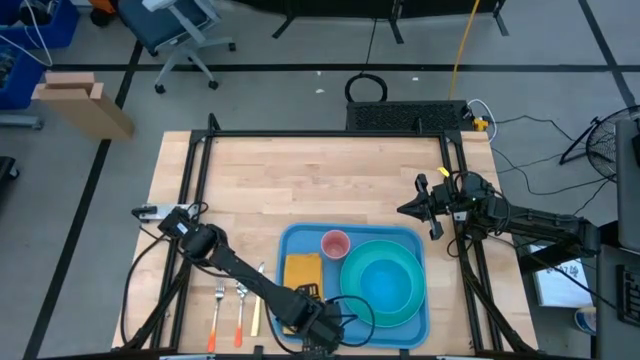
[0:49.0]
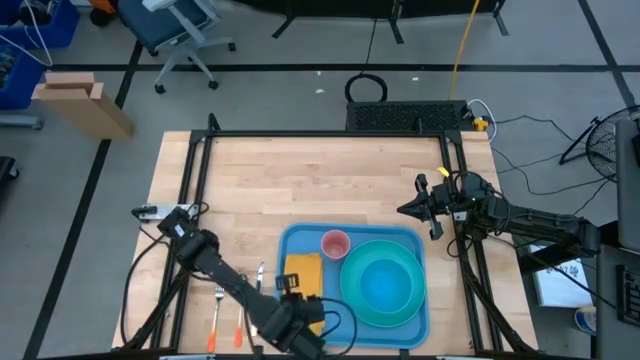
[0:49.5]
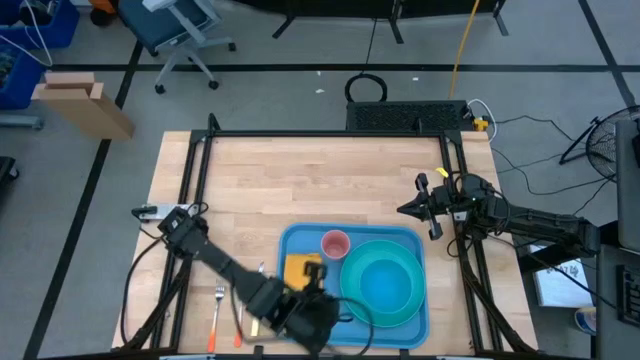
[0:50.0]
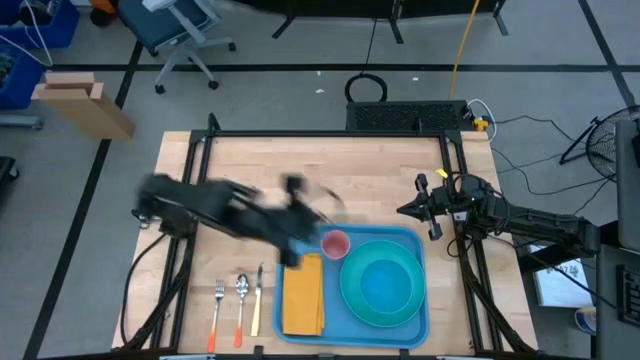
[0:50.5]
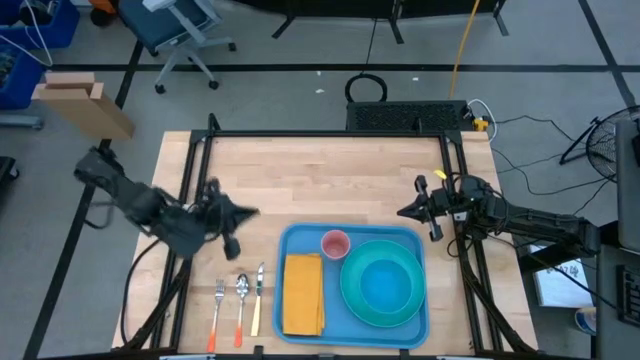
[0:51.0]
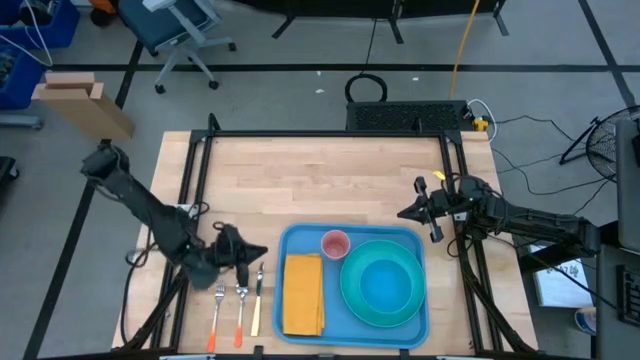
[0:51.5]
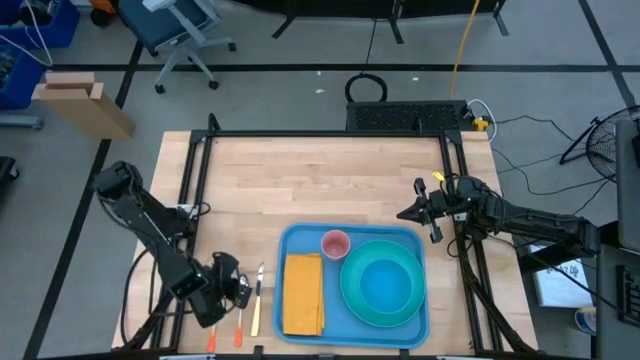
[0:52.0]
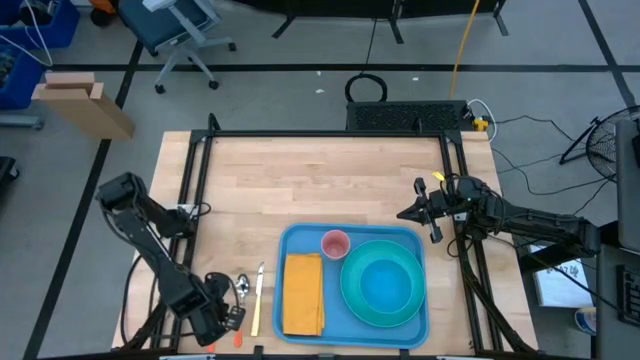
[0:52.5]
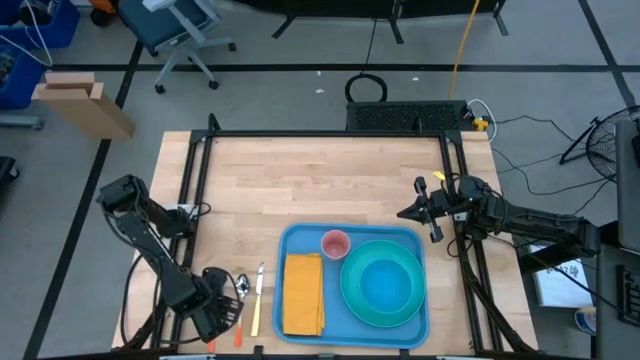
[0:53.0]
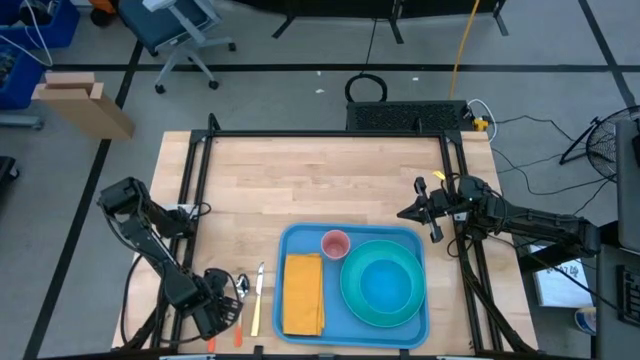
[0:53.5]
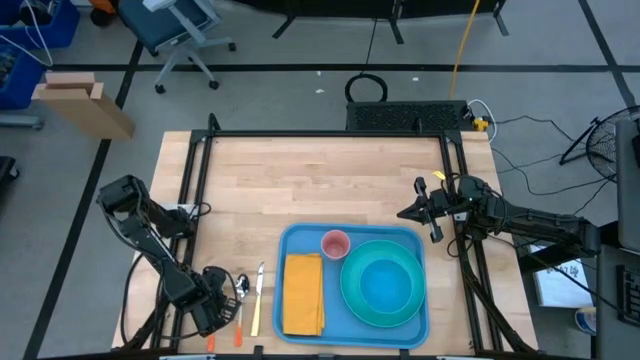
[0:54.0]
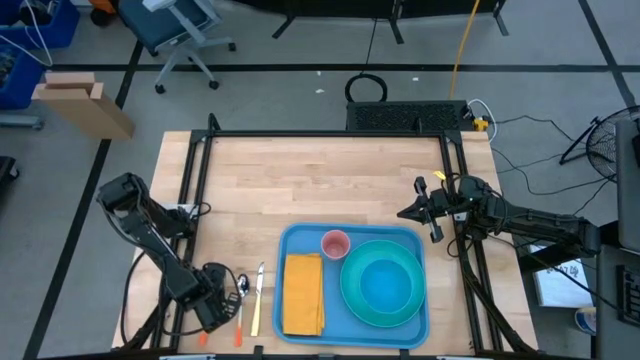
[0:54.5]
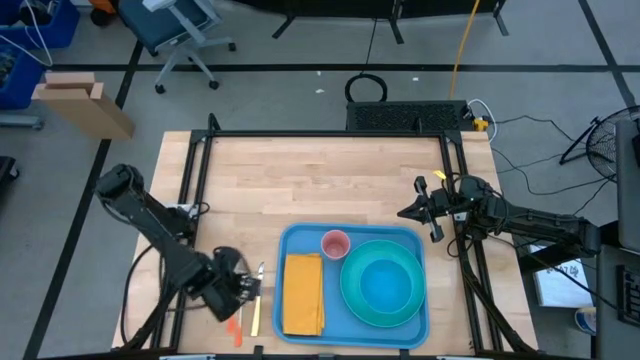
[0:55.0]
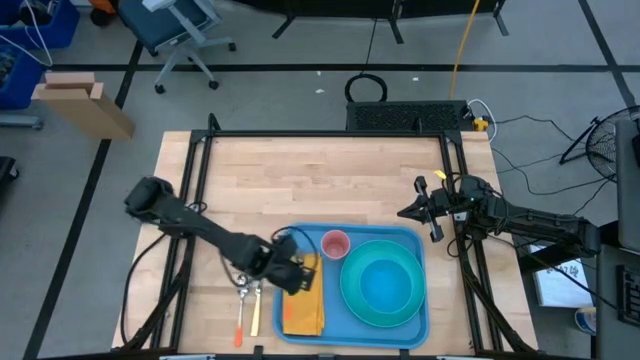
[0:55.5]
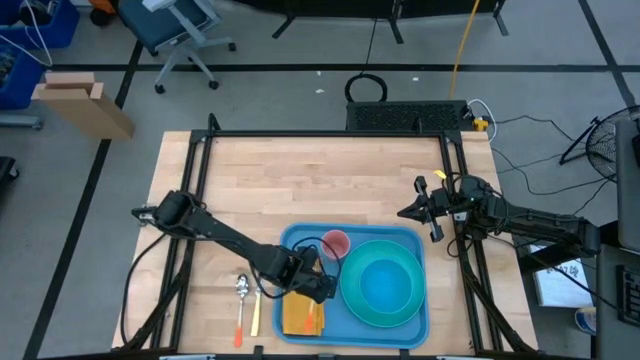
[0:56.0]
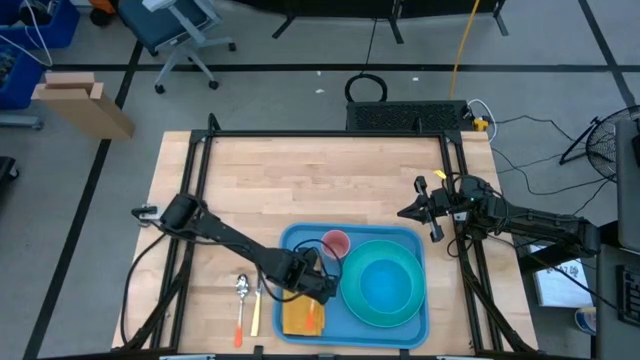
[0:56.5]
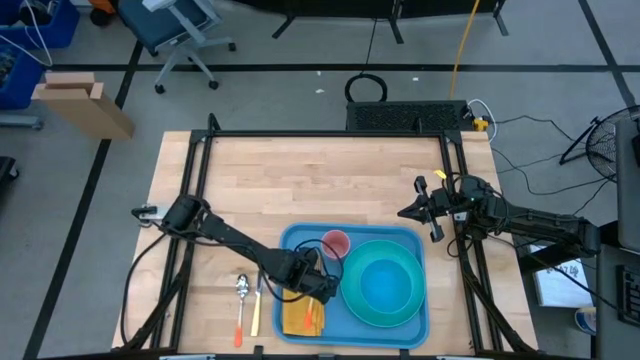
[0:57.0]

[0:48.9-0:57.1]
Task: Set up tray
Put the orange fork on top of the yellow napkin

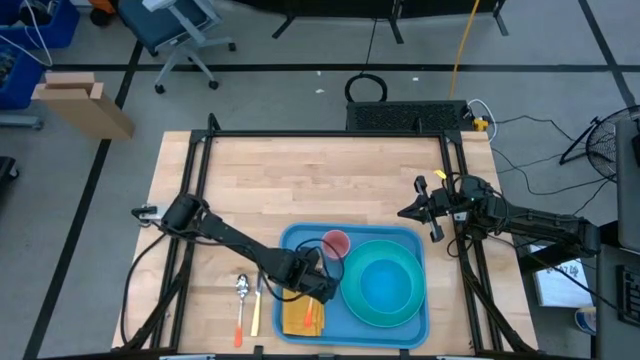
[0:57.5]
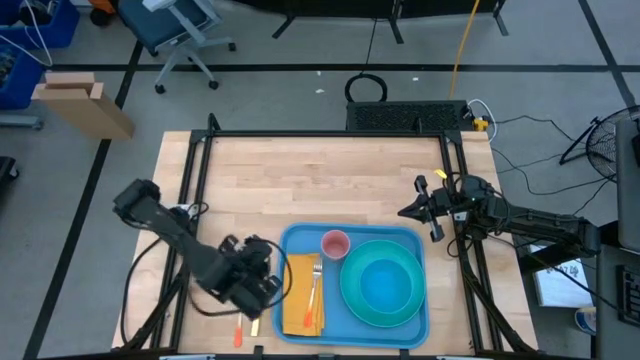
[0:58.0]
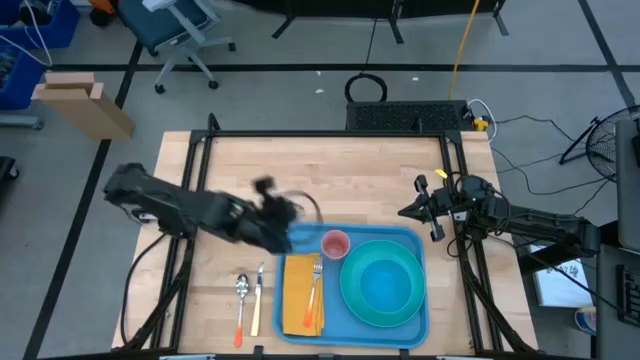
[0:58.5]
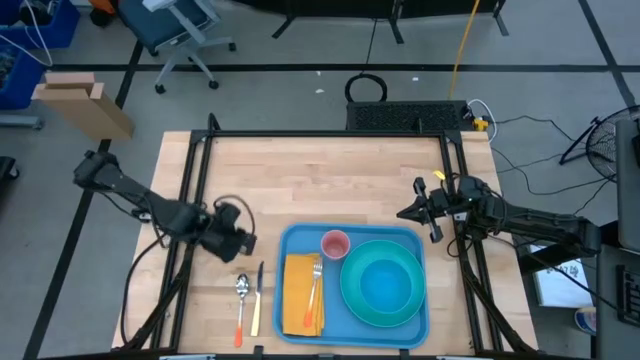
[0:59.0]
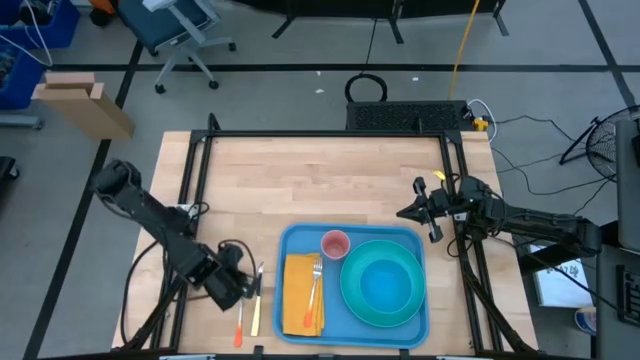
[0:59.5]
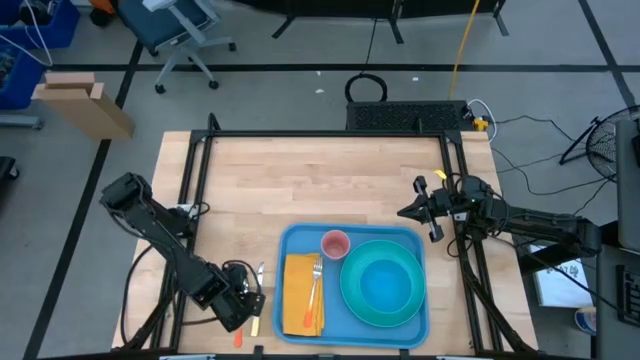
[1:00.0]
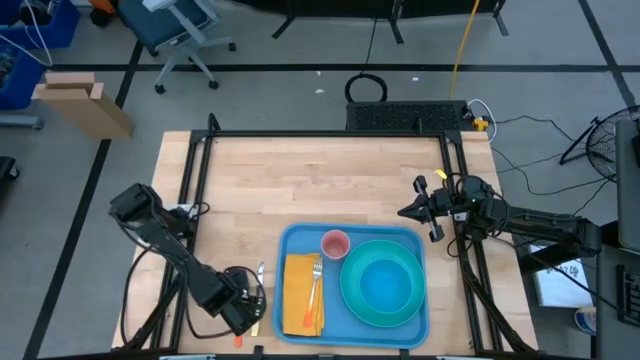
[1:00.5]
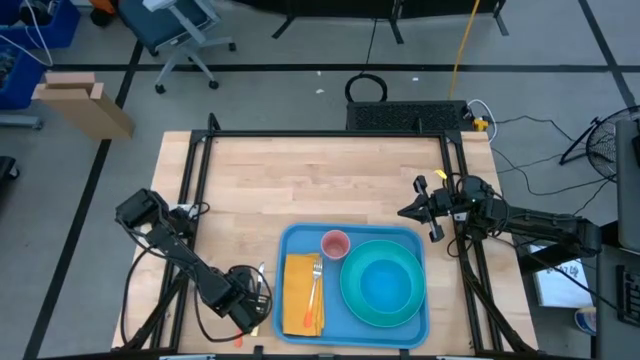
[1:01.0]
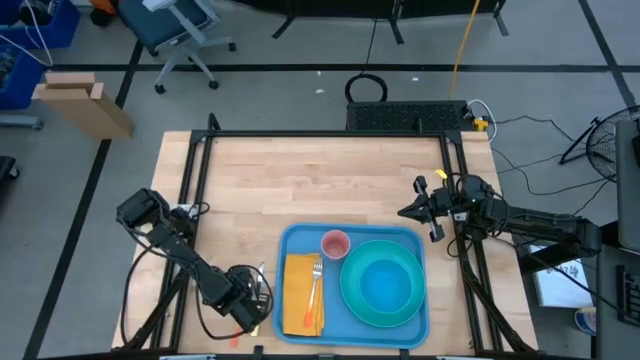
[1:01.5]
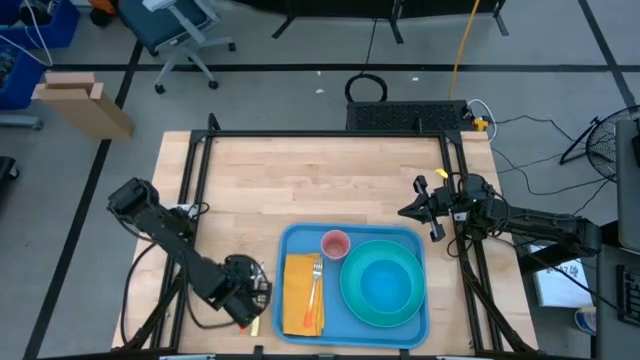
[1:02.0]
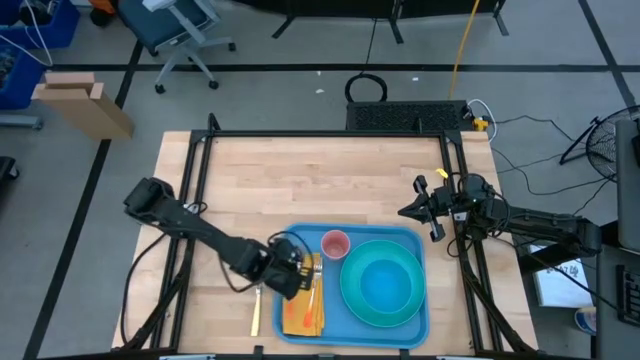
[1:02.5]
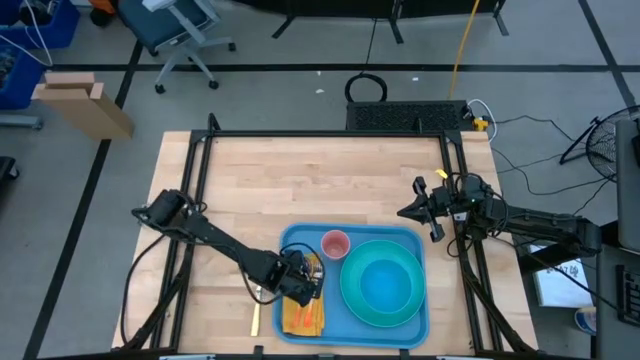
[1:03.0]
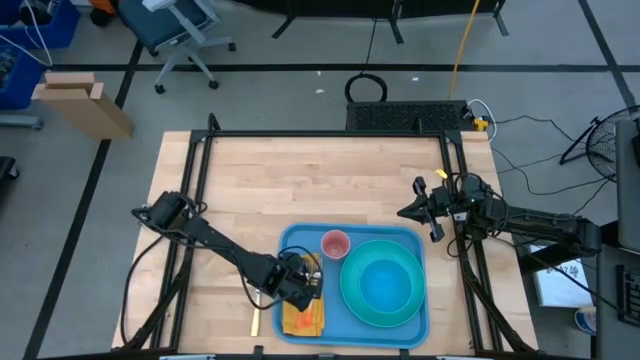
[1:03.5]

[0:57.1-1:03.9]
Put the orange spoon on top of the yellow napkin to the left of the orange fork

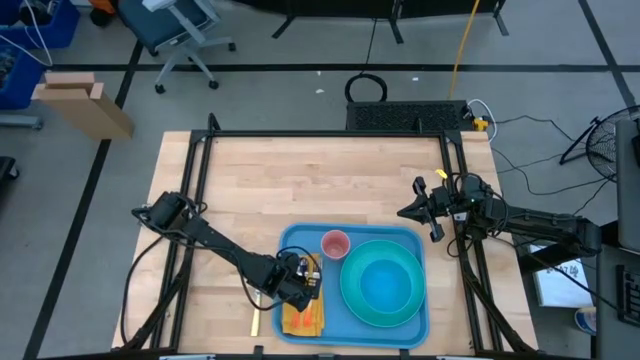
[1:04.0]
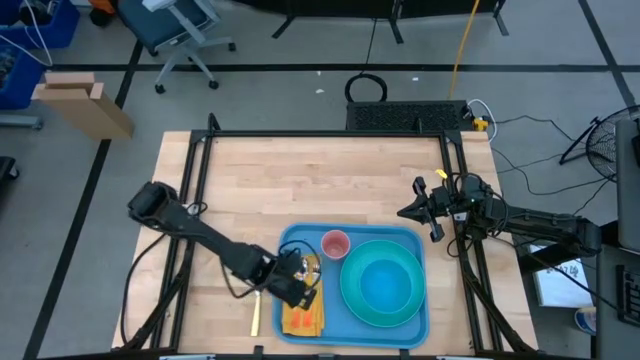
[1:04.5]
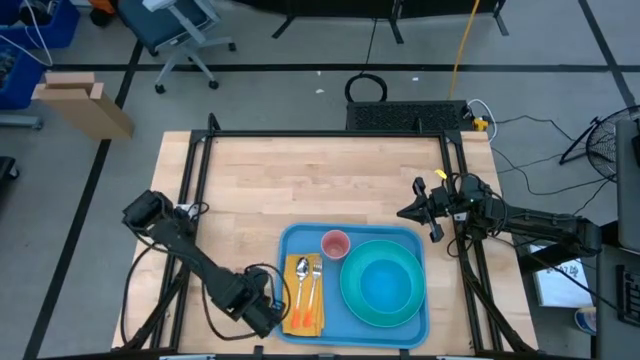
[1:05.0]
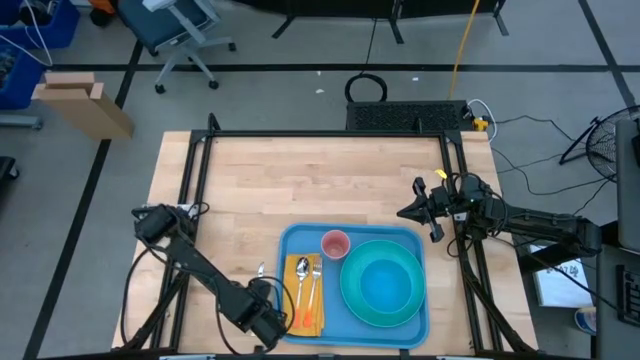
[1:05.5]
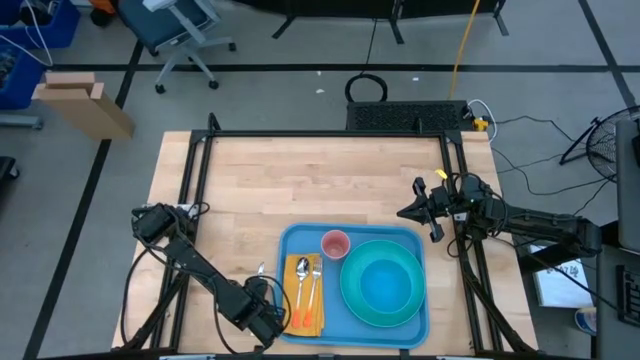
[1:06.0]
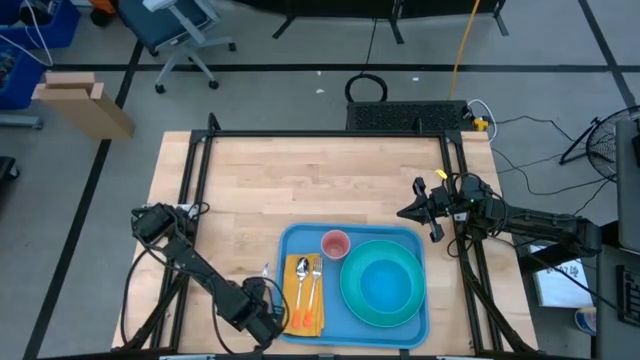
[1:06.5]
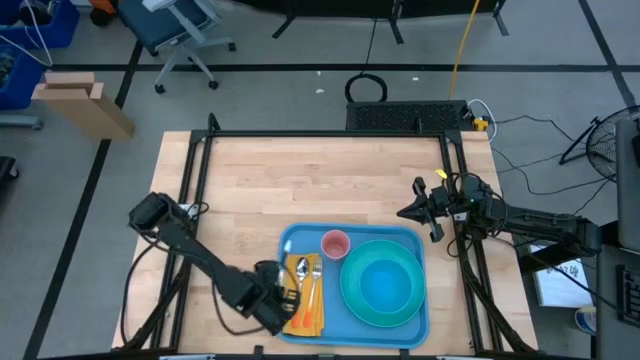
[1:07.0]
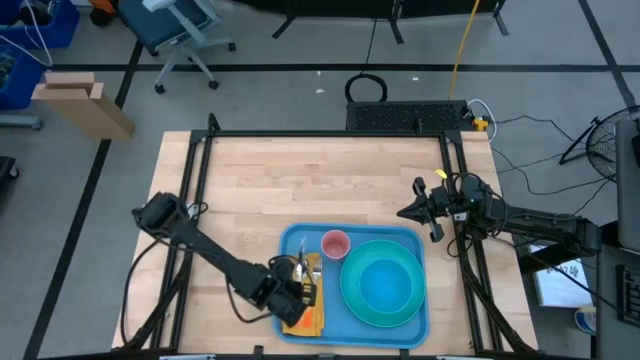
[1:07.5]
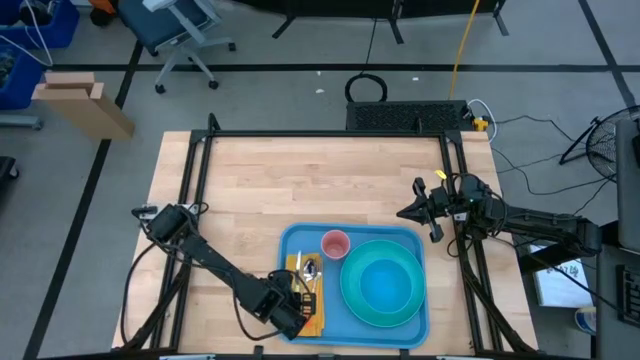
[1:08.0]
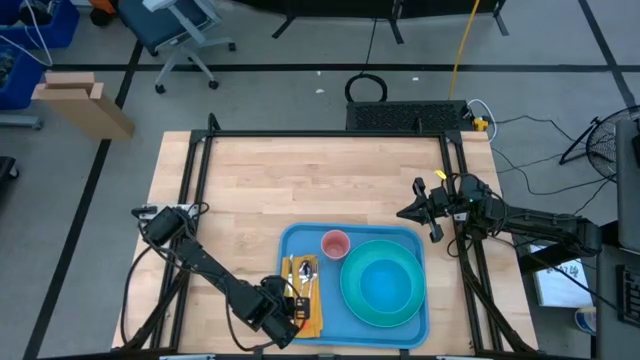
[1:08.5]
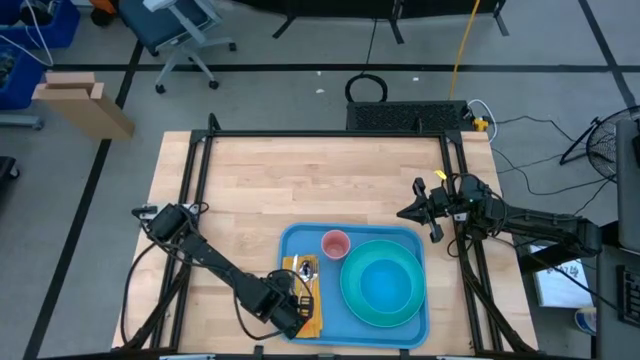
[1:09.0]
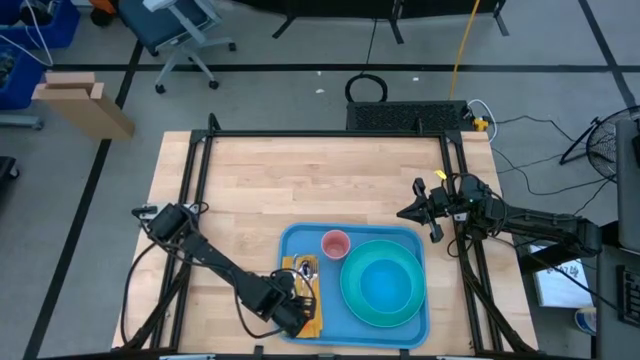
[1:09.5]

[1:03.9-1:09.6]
Put the yellow knife on top of the yellow napkin to the left of the orange spoon

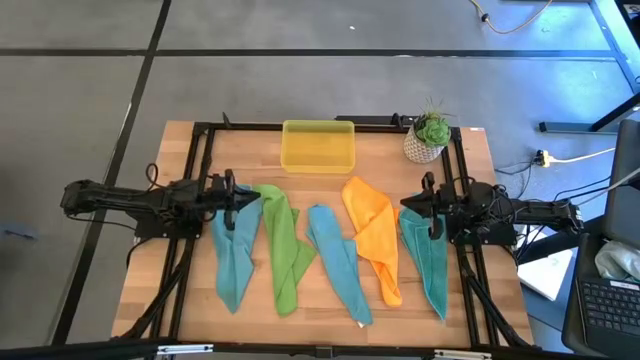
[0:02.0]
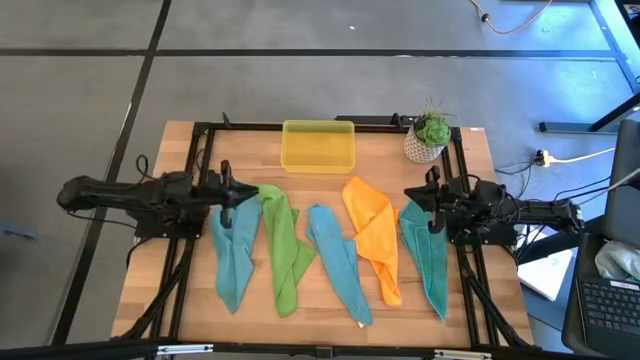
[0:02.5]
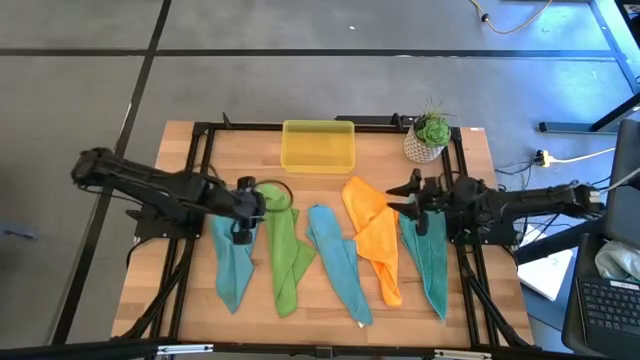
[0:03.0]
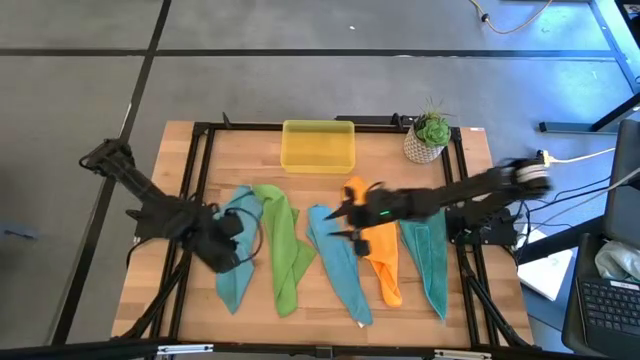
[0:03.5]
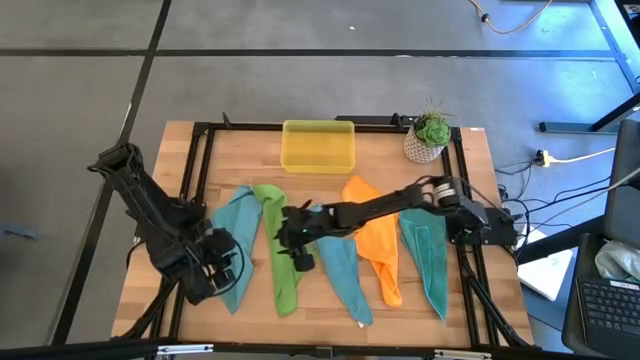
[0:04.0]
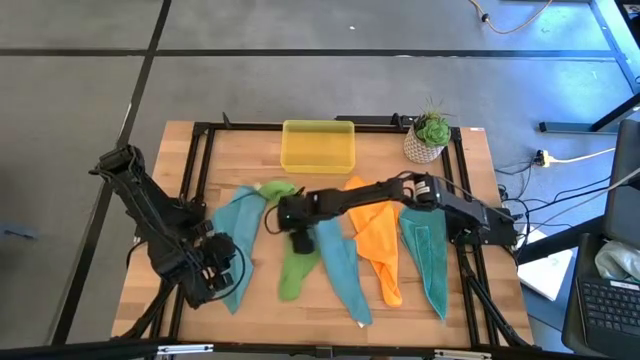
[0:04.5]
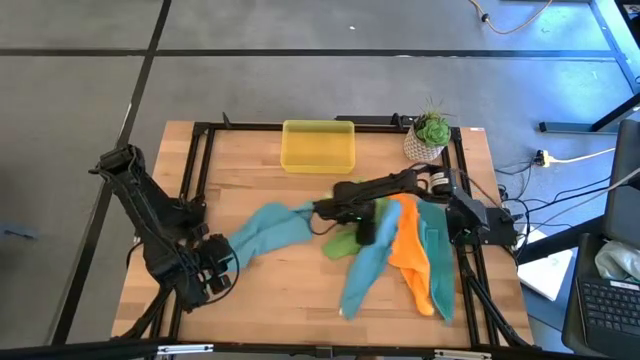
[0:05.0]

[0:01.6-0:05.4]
Task: Fold microfiber towels
Adjust the colored microfiber cloths
